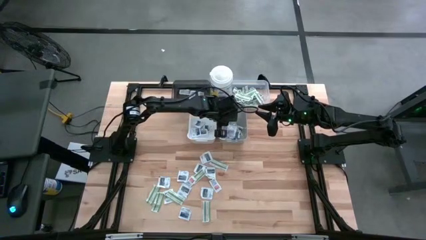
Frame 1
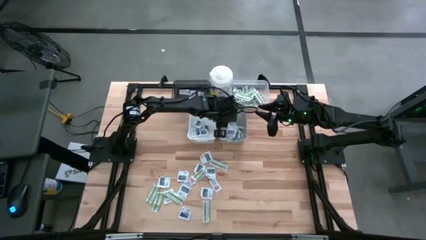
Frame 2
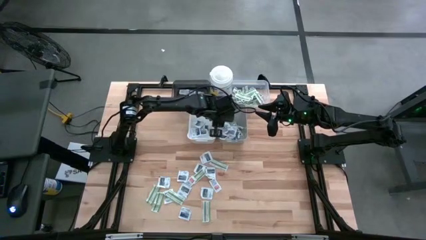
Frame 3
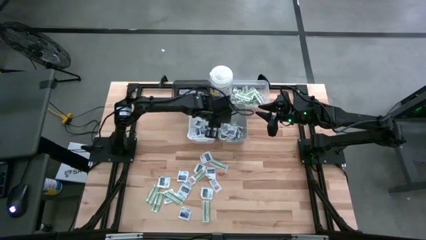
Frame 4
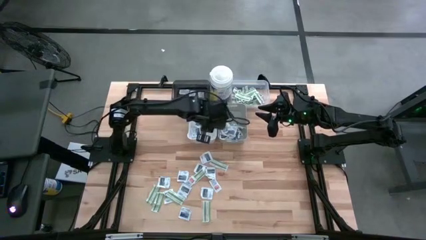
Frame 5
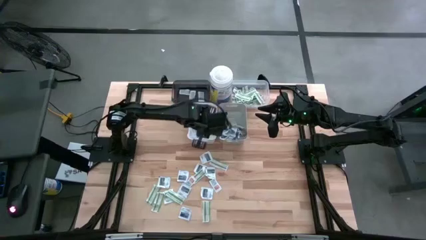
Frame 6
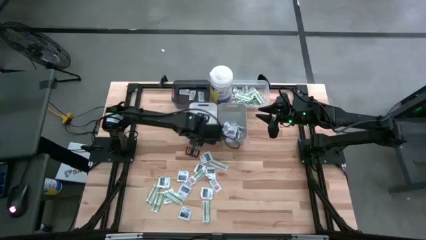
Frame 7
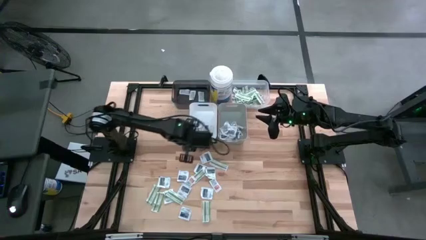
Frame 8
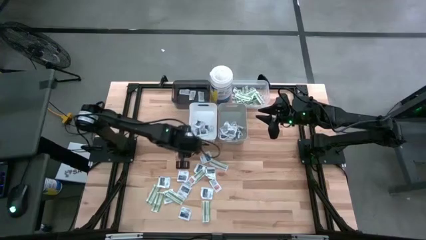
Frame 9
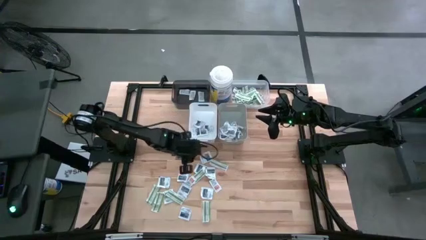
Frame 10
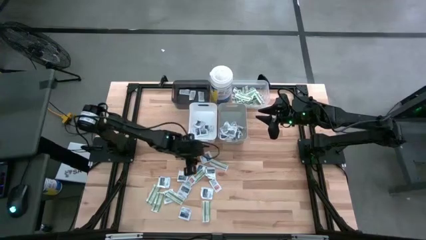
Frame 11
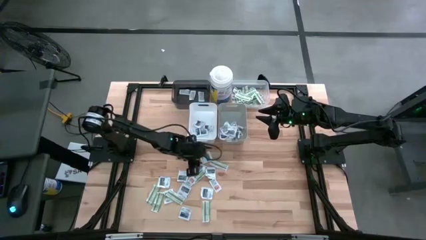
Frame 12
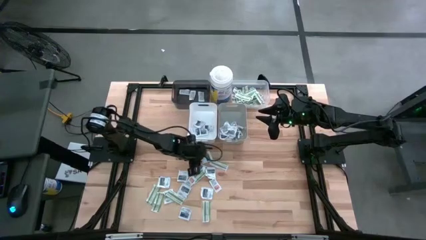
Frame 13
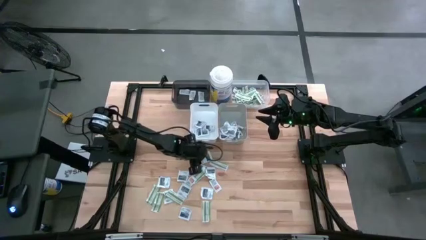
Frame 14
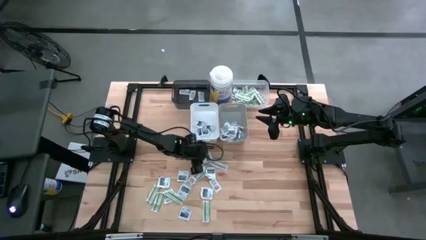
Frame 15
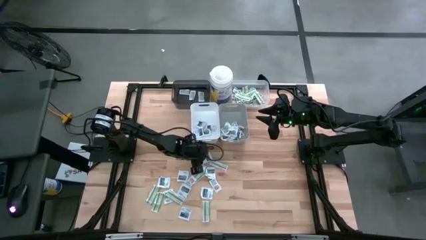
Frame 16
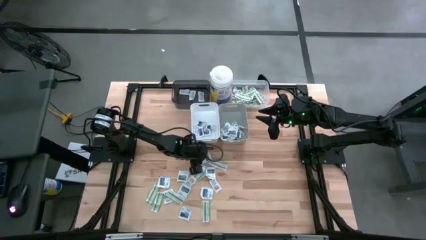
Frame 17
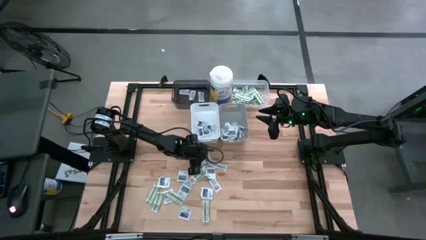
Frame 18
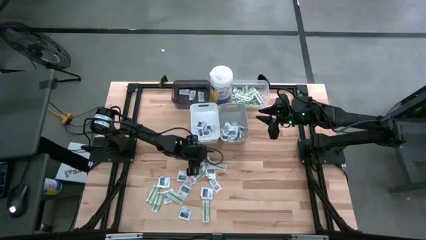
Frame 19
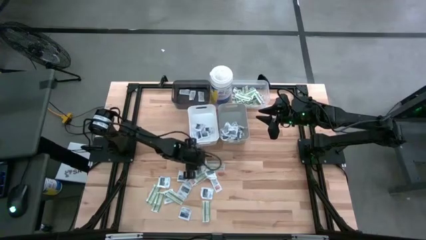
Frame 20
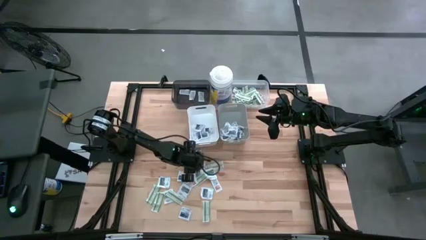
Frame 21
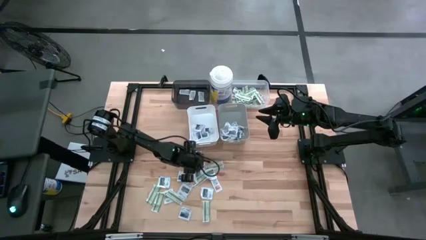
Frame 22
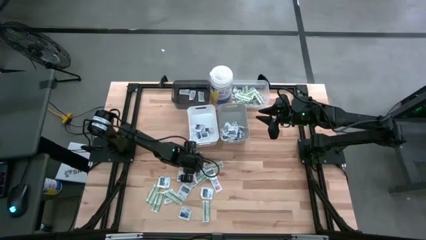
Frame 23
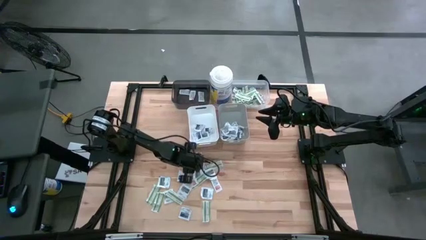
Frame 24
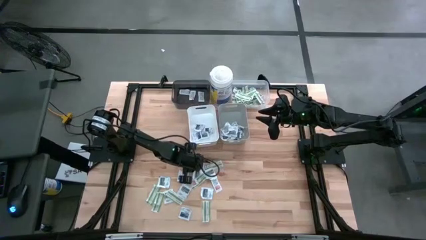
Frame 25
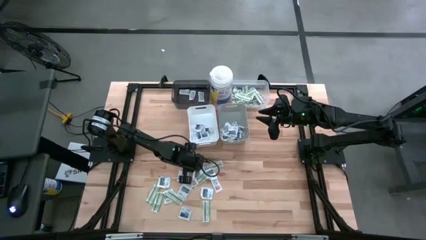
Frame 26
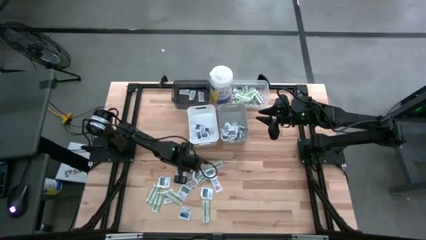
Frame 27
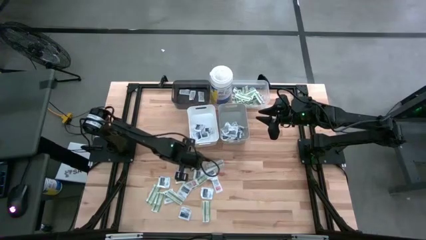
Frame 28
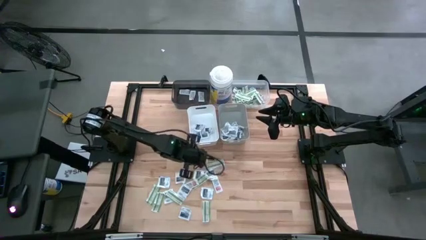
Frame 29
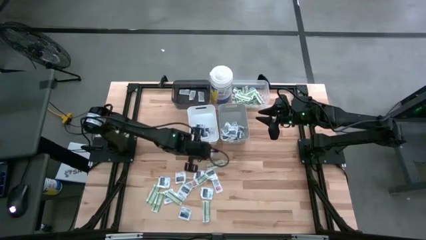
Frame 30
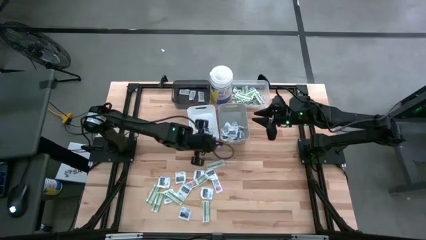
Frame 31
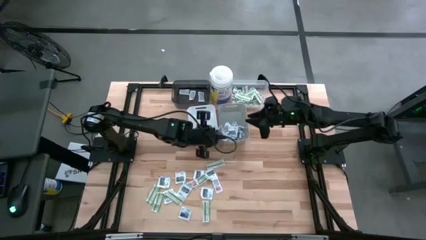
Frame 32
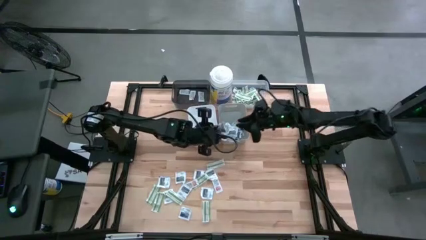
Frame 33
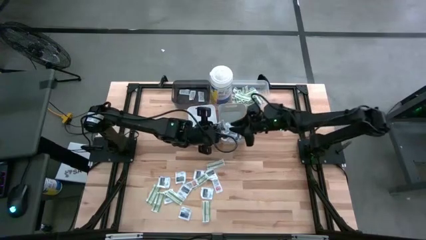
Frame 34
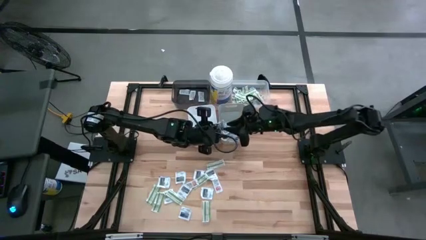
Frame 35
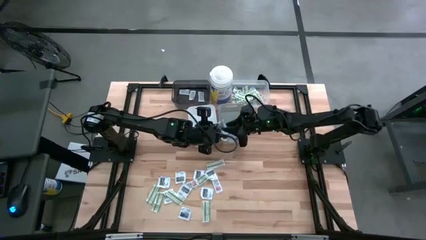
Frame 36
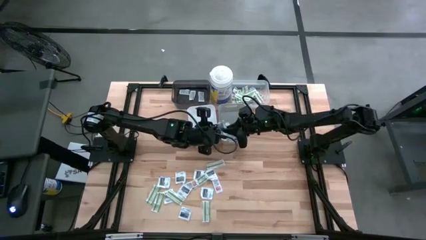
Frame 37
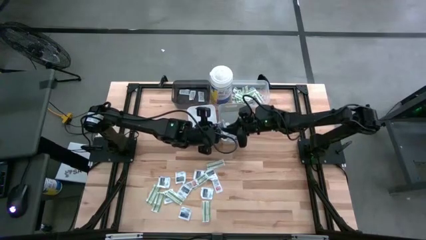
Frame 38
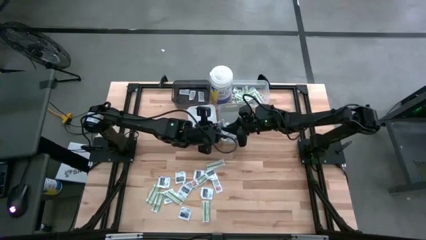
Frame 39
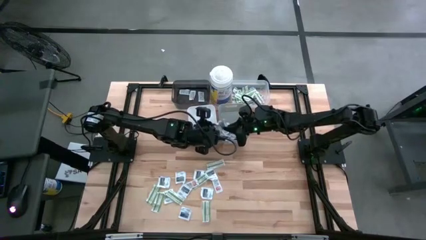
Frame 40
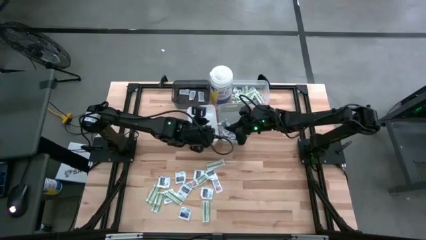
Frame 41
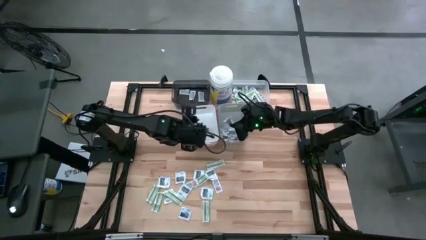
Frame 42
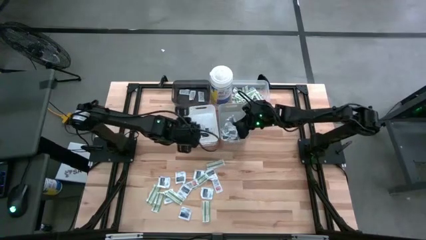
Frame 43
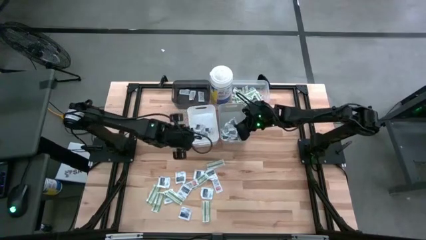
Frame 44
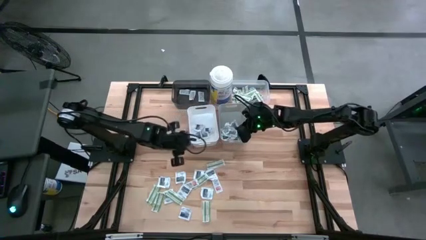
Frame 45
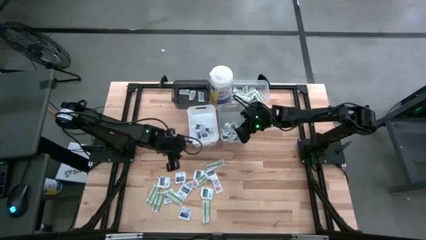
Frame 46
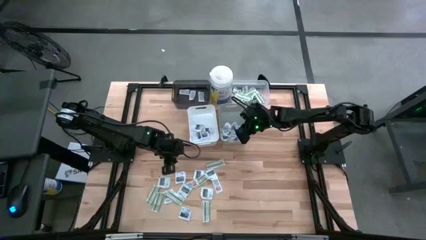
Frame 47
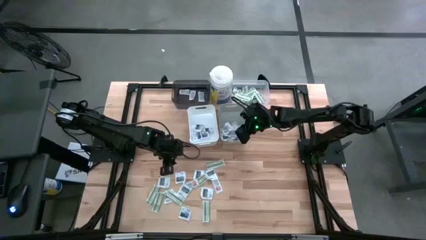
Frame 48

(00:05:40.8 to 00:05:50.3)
Task: Pick & Place First Aid Supplies
Put the wipe into the gray bin

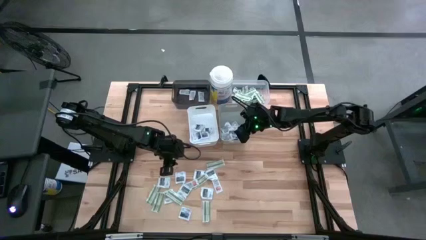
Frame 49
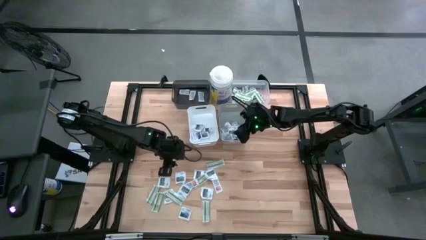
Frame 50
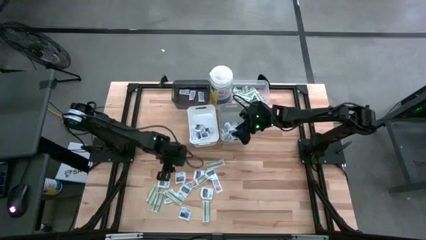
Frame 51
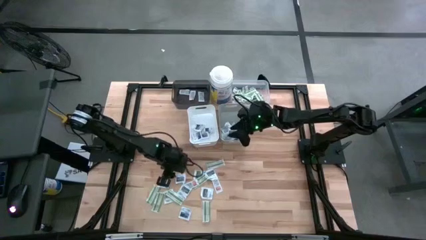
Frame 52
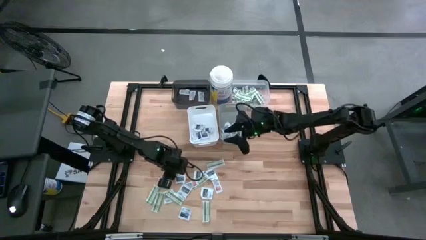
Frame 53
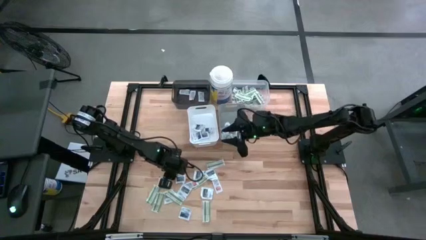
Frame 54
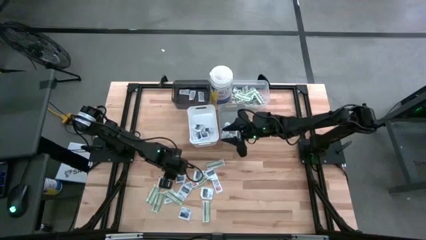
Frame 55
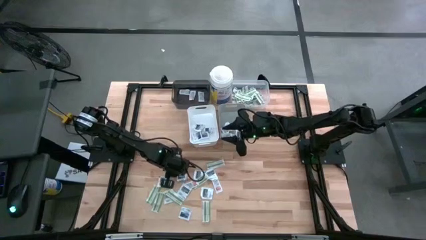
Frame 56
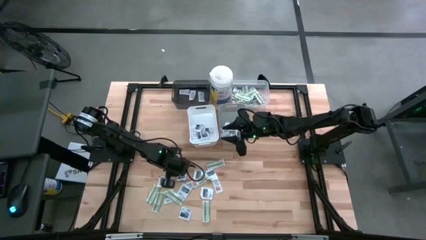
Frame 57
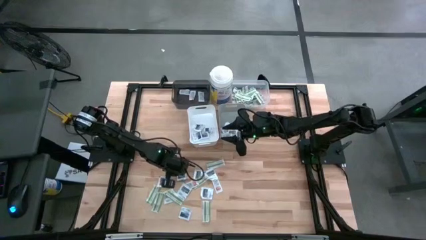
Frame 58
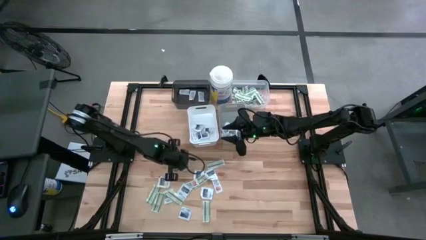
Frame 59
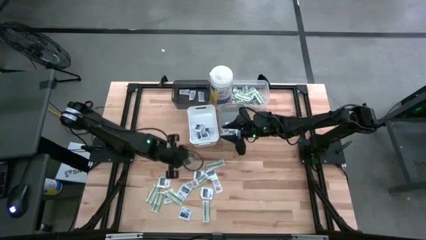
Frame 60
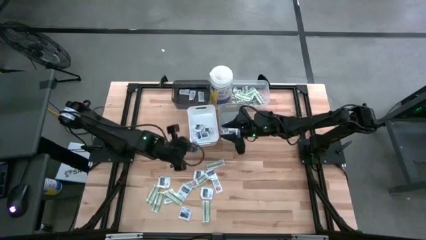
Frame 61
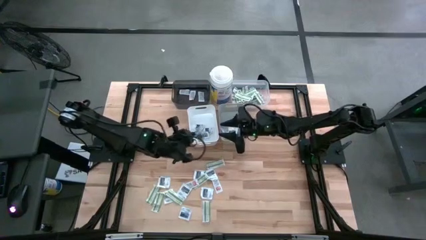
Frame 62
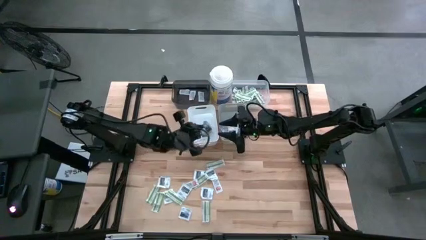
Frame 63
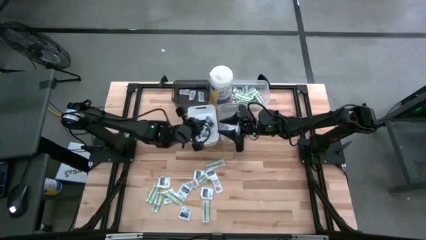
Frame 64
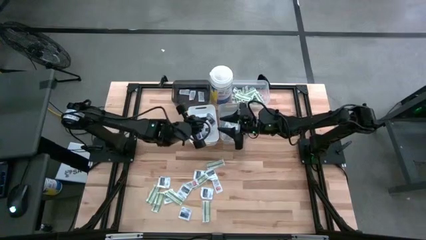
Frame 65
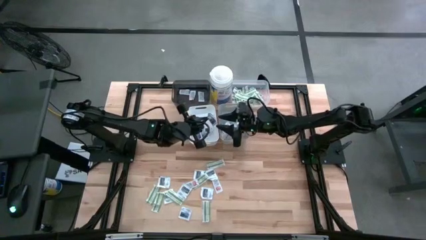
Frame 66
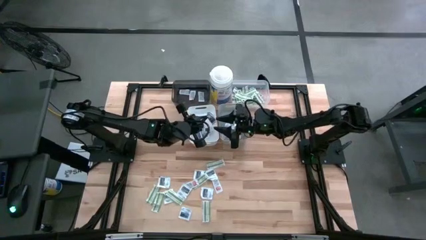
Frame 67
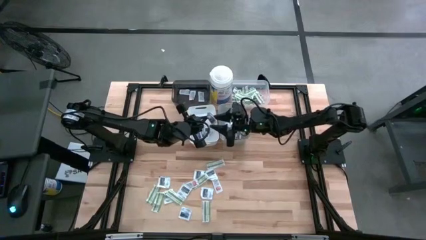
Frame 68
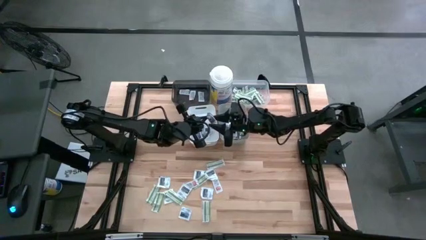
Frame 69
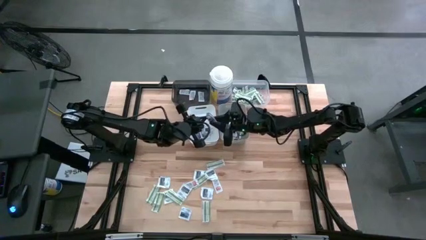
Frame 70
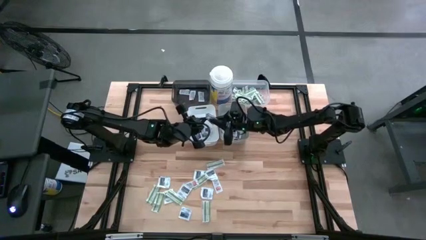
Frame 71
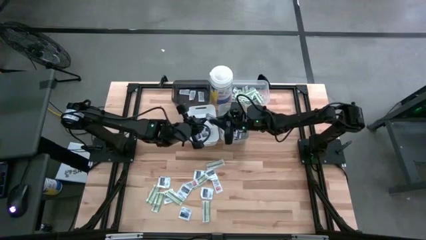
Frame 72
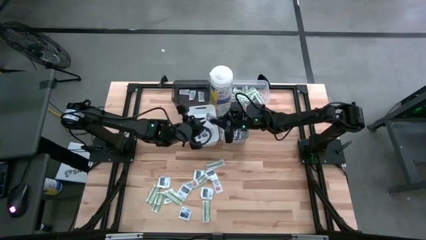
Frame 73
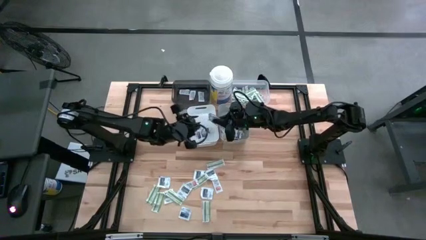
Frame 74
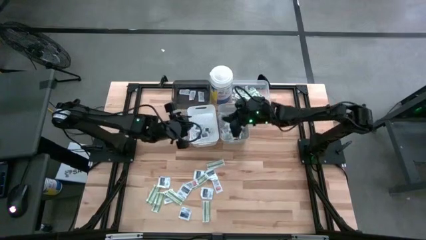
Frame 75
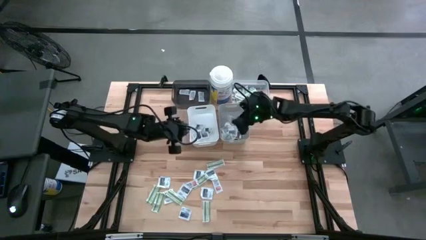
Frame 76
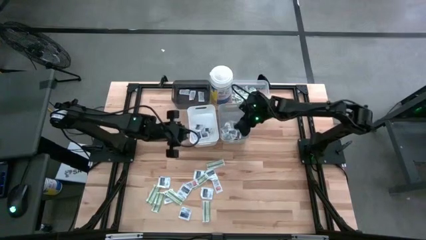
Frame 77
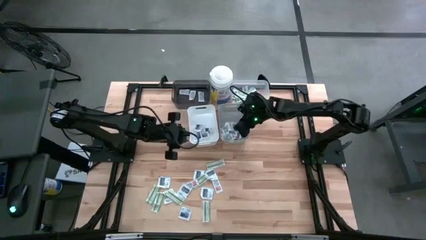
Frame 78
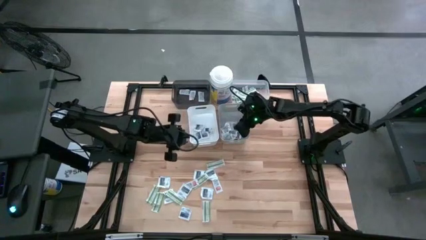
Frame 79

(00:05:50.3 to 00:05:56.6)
Put the wipe into the gray bin
